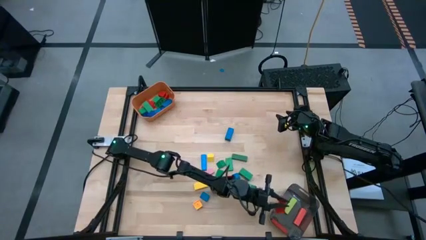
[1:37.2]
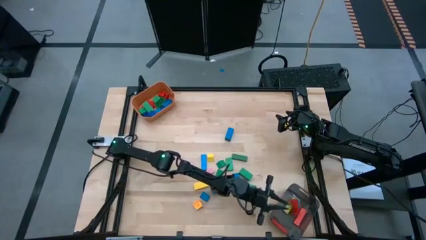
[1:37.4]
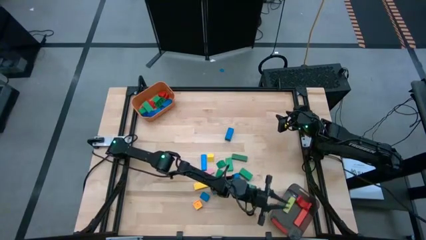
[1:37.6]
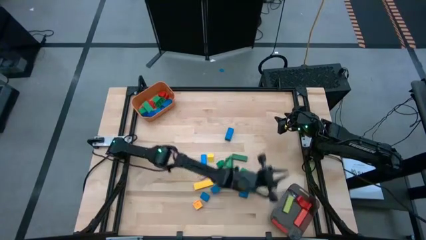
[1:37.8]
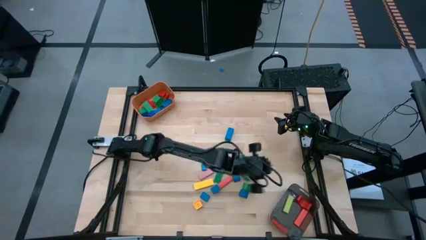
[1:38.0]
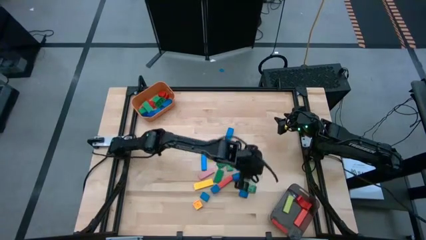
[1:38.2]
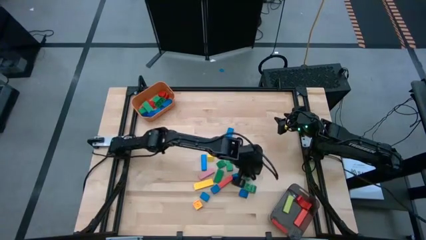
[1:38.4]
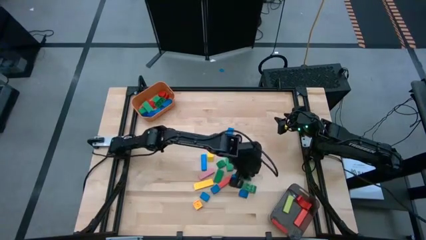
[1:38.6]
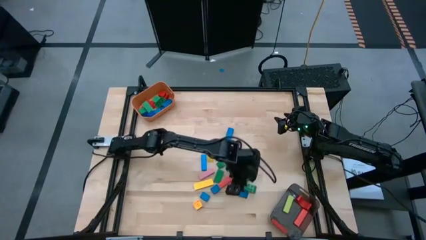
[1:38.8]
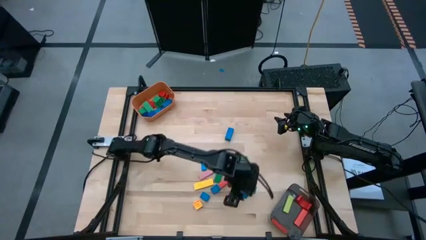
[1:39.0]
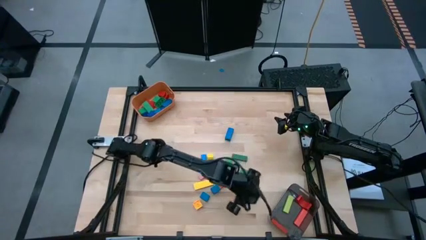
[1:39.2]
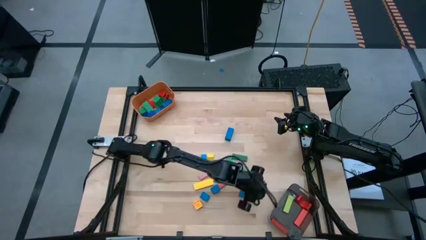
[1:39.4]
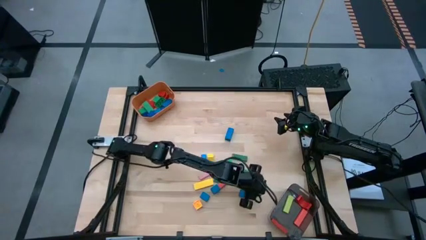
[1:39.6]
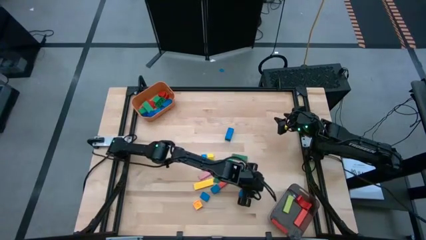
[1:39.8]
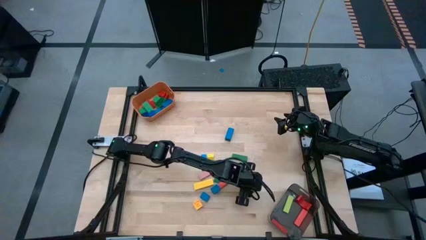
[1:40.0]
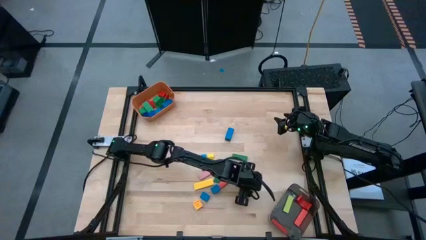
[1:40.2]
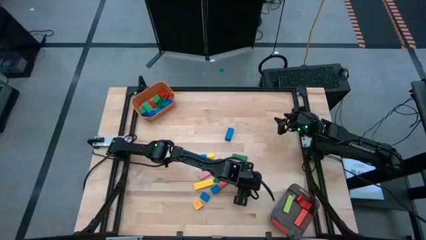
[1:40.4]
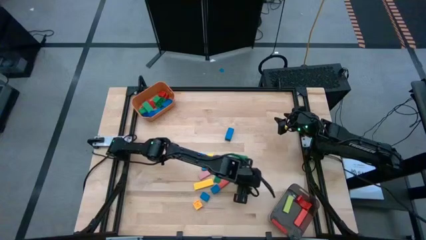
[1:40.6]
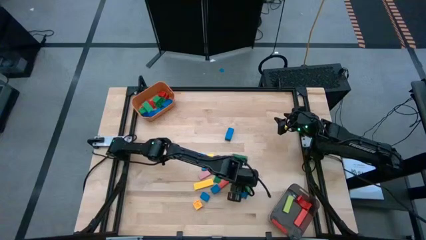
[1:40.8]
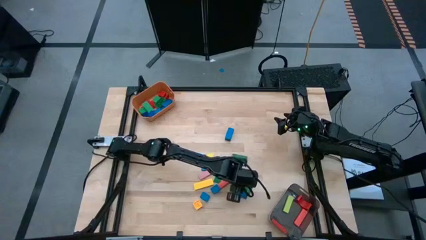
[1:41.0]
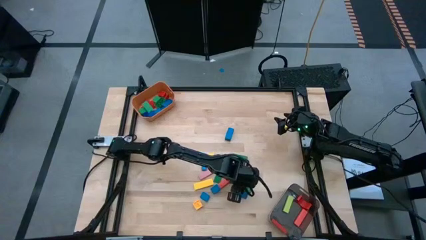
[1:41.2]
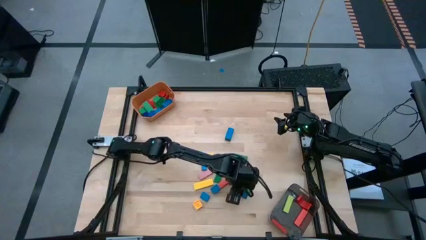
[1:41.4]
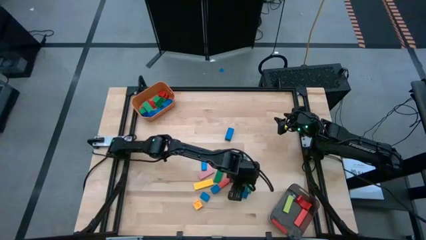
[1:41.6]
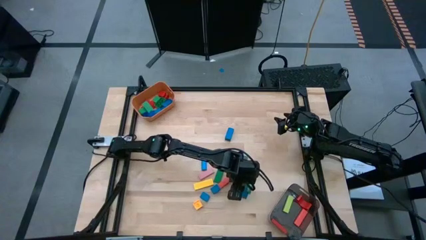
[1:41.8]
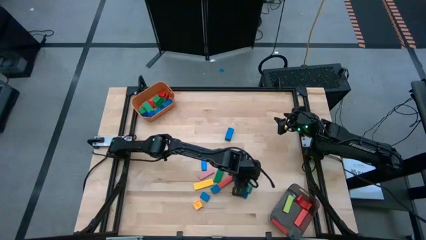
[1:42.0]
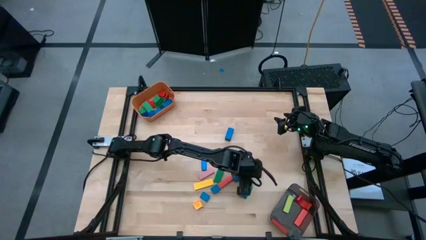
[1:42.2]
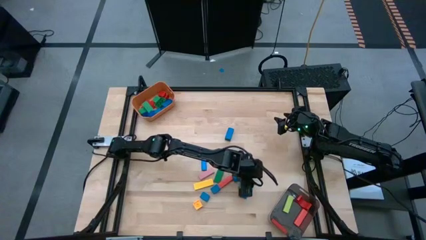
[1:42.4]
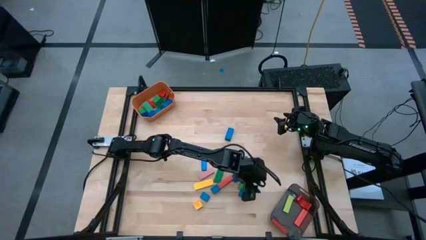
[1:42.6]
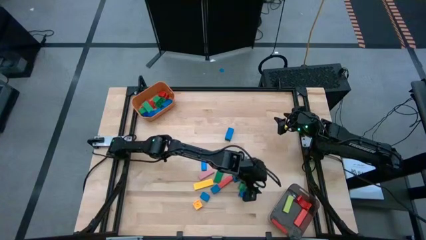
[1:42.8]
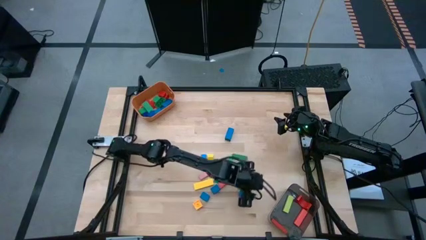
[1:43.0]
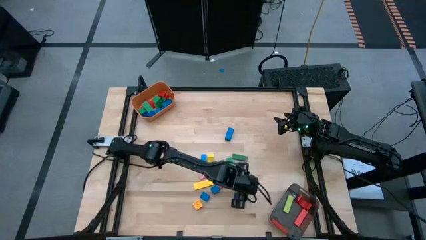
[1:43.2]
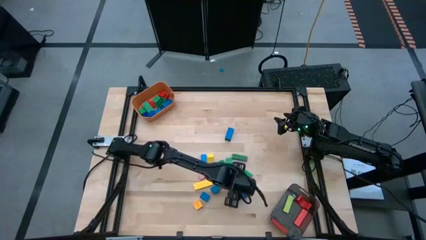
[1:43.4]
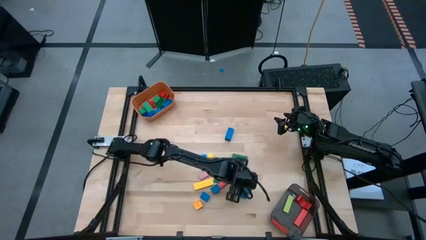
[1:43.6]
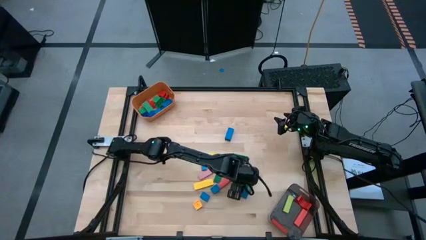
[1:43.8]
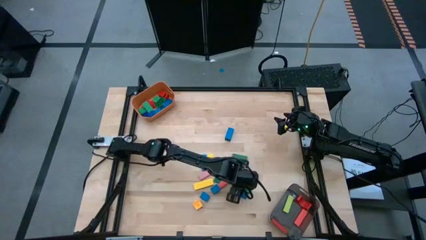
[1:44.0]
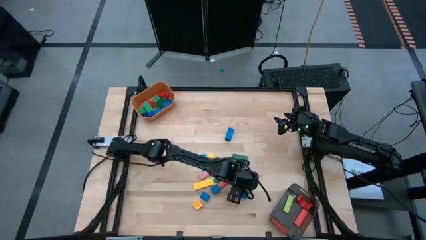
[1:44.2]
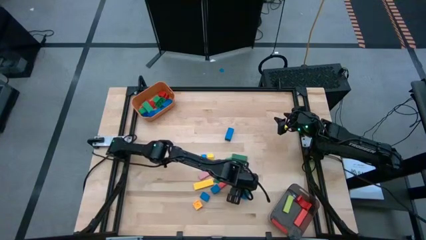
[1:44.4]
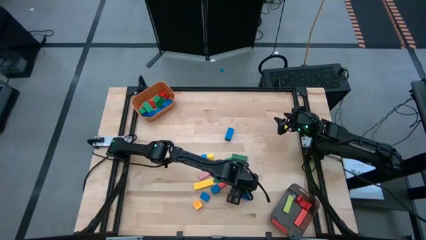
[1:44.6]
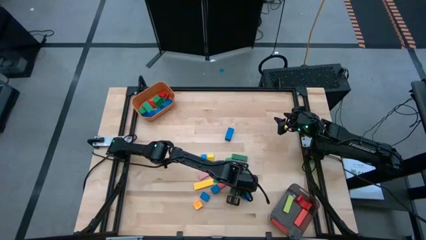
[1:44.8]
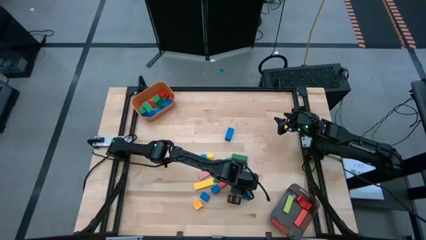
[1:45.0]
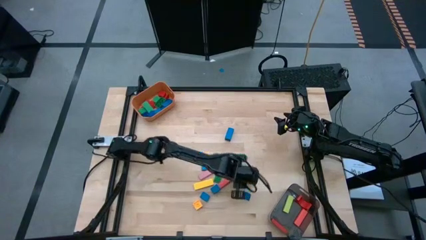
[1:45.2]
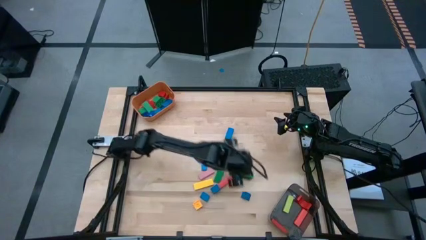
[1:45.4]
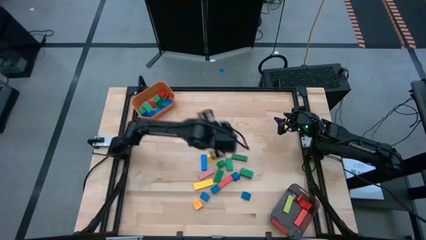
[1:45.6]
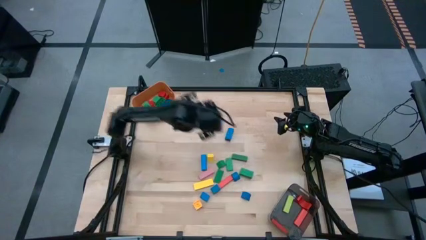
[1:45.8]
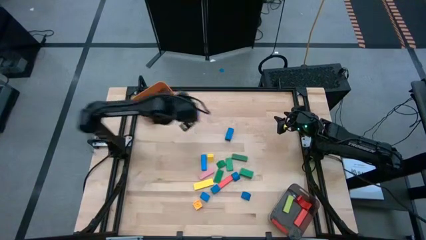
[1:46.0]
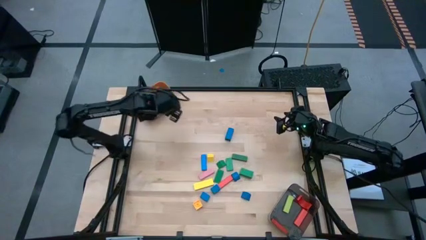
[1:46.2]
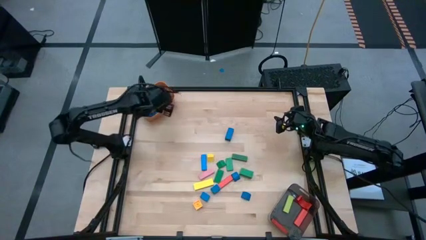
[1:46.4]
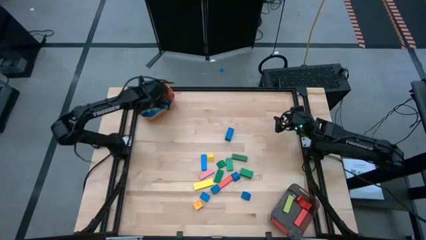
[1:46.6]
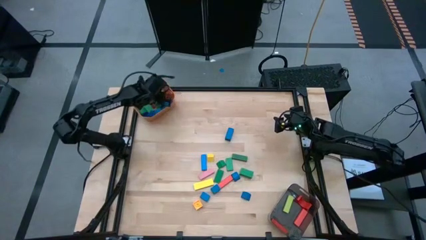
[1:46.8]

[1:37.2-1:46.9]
Task: Sort blocks by size
Put the small green game piece into the orange bin

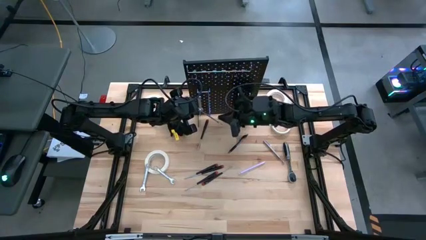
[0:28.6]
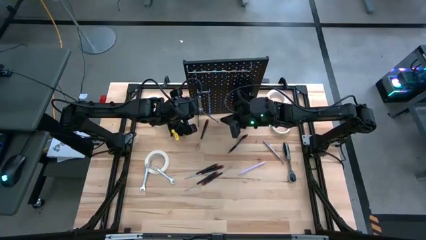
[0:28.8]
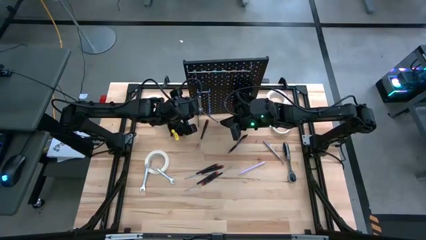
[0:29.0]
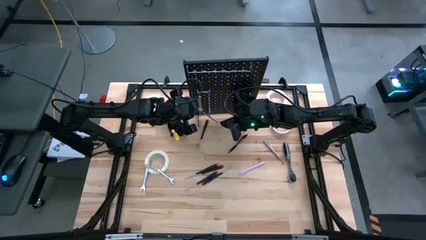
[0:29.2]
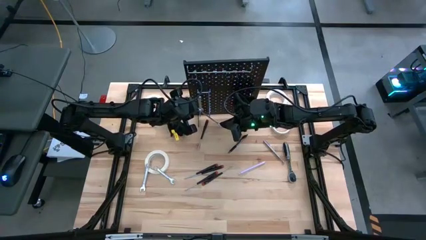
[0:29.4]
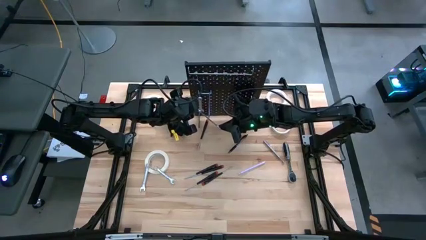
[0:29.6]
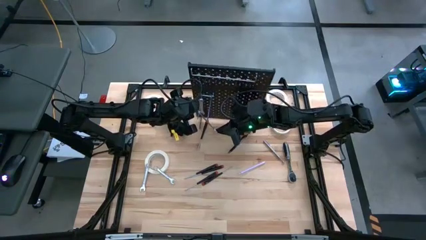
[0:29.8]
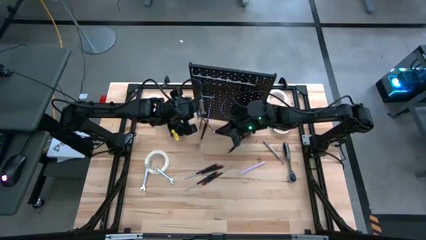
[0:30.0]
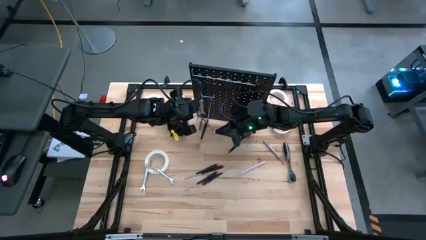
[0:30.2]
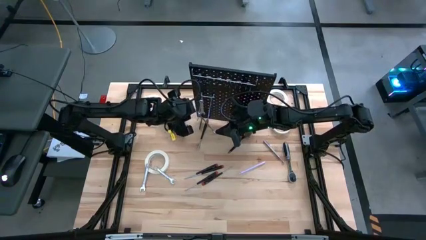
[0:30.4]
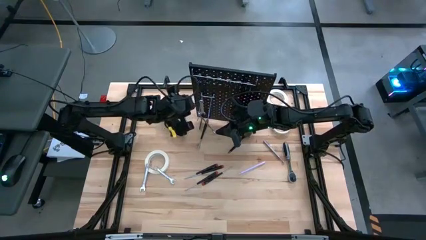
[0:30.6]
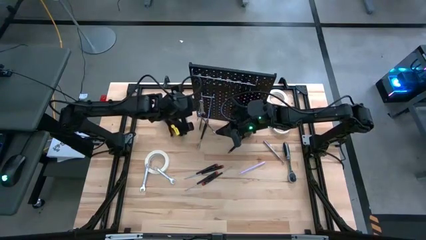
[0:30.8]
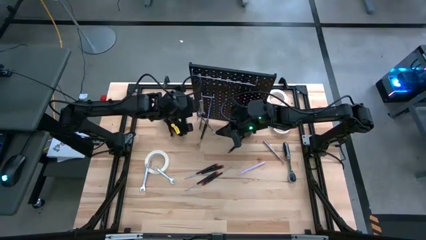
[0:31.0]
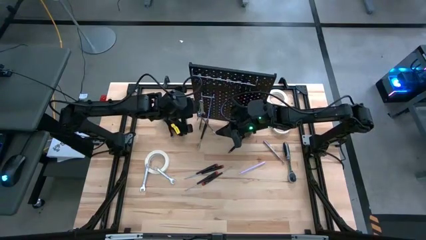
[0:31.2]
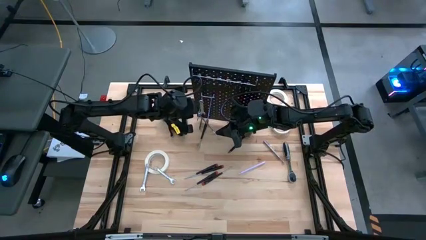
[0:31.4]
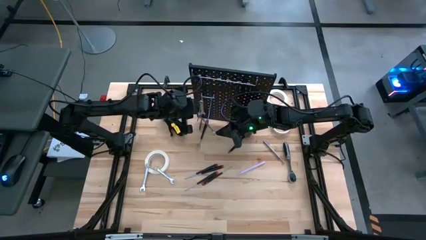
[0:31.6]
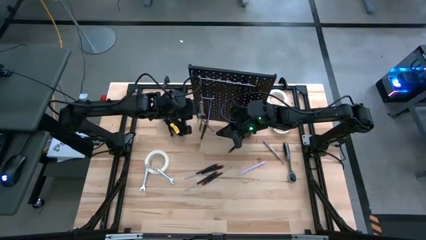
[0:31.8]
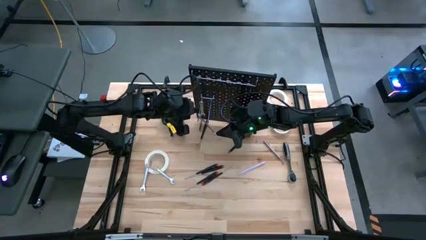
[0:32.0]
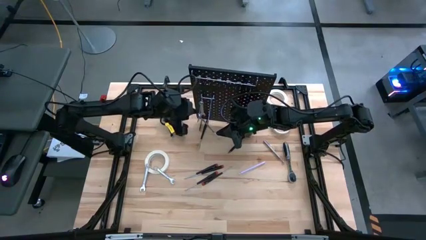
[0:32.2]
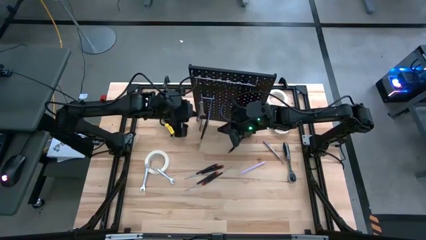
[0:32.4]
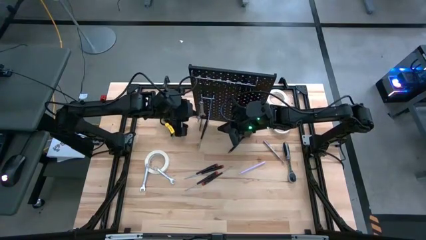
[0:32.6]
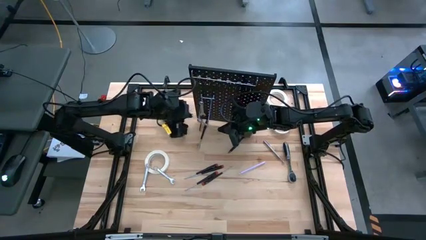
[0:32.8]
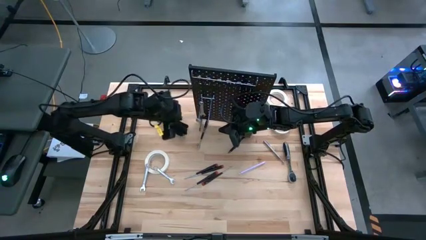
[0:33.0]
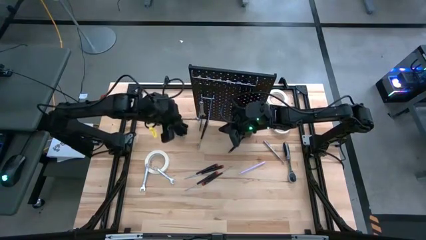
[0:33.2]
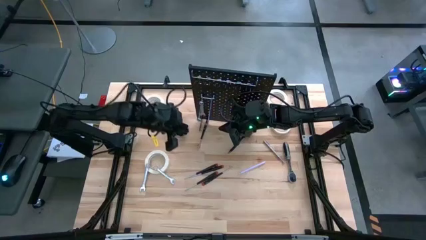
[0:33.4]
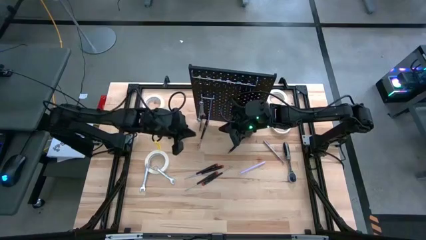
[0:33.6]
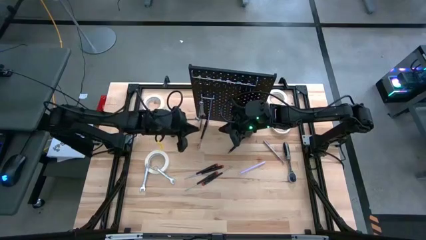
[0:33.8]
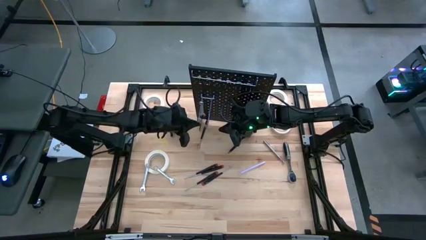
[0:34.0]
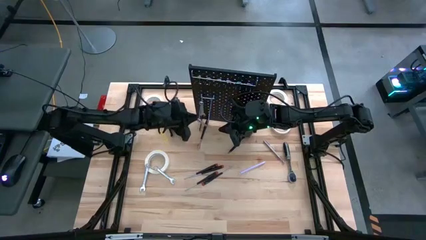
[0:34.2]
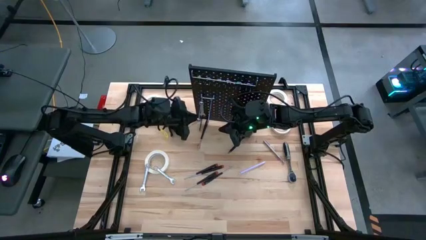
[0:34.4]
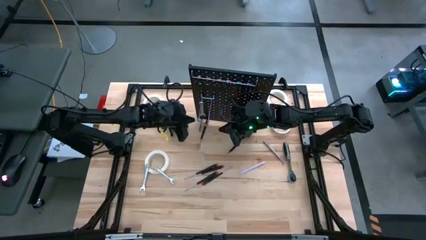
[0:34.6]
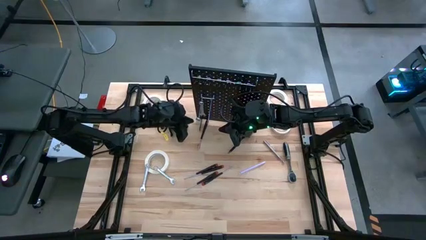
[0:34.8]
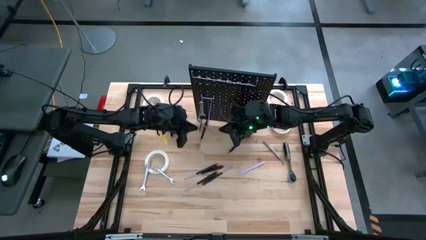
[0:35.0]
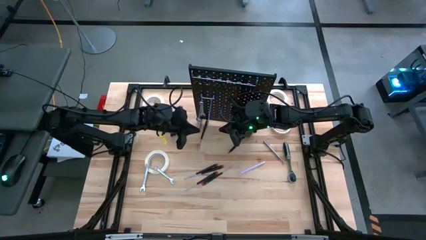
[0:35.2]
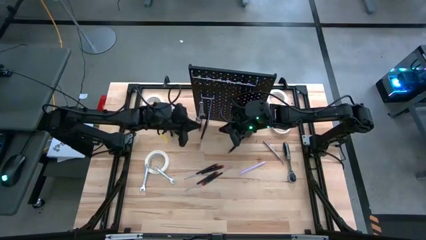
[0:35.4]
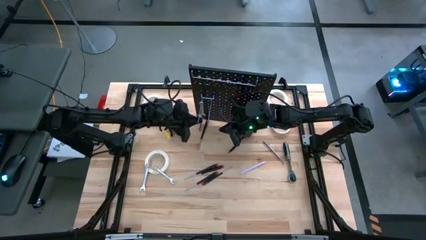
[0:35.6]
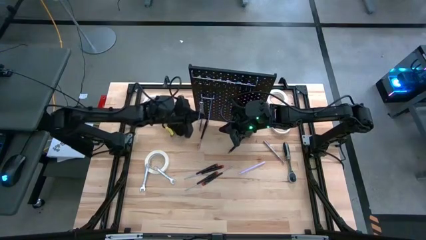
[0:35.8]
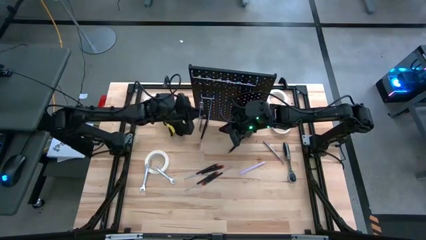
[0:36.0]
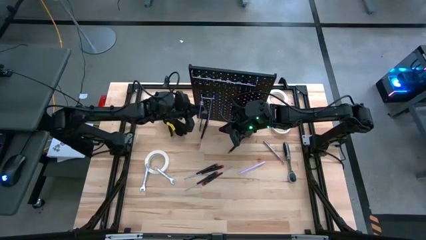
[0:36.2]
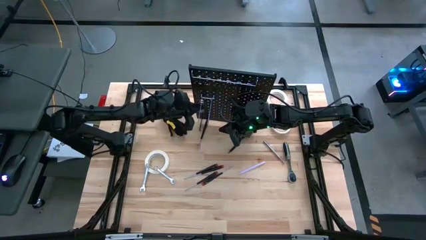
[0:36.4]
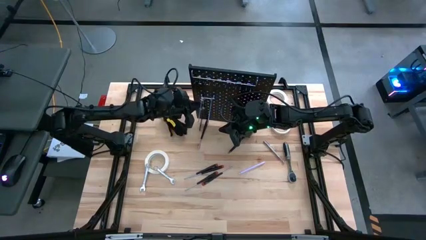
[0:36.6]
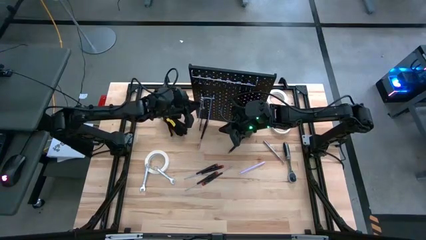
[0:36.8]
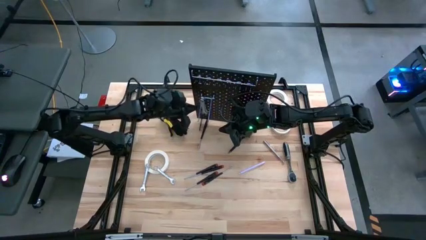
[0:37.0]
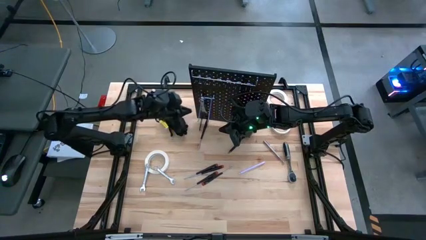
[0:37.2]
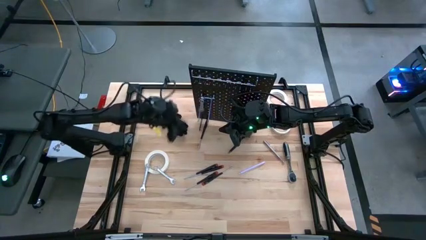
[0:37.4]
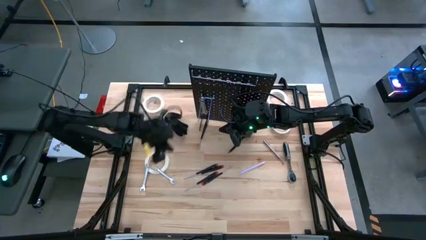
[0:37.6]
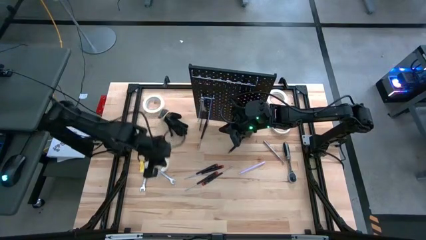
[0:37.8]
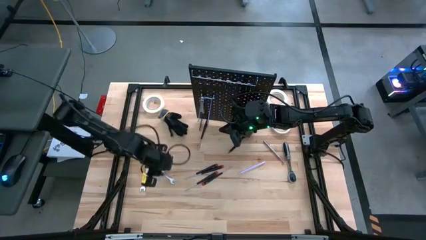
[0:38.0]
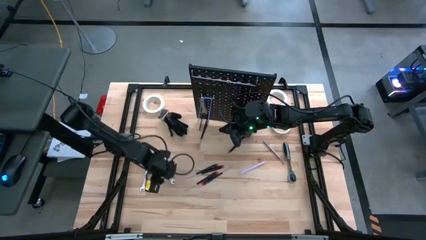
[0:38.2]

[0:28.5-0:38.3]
Task: Hang tools onto peg board
Hang the silver wrench on the peg board
